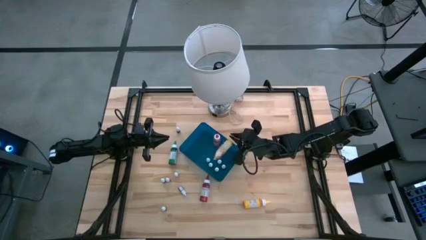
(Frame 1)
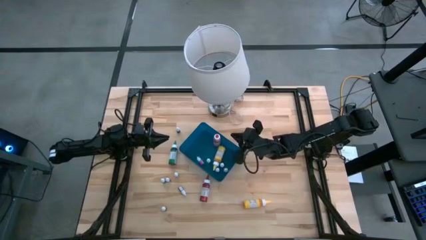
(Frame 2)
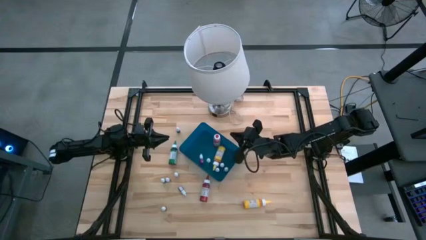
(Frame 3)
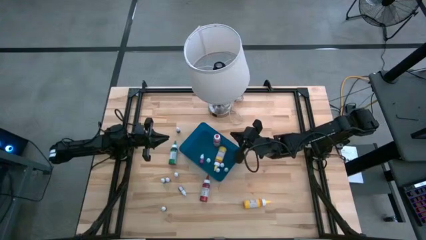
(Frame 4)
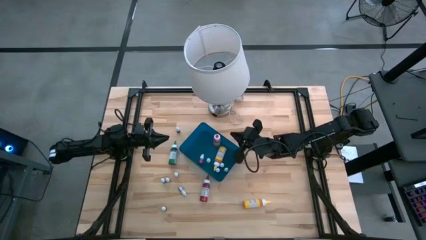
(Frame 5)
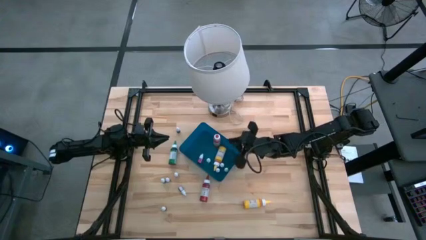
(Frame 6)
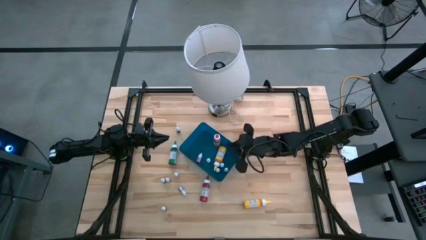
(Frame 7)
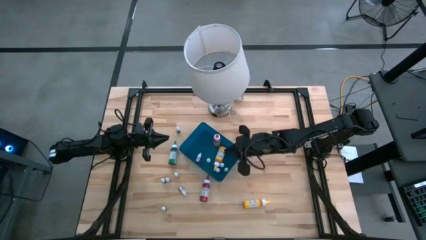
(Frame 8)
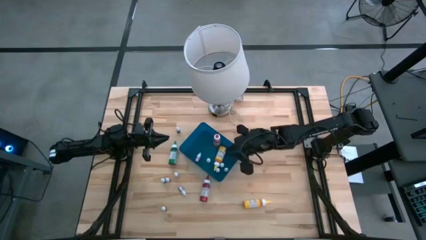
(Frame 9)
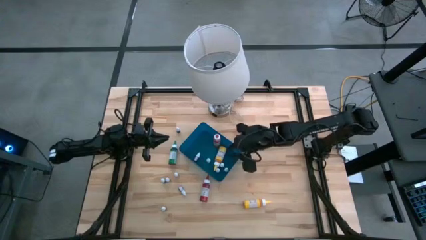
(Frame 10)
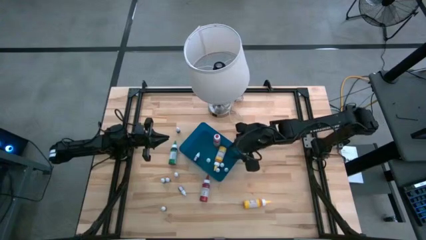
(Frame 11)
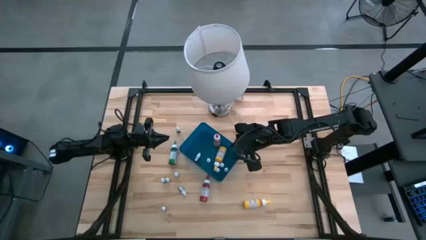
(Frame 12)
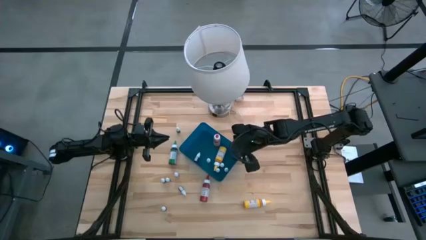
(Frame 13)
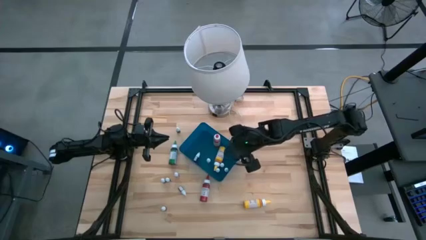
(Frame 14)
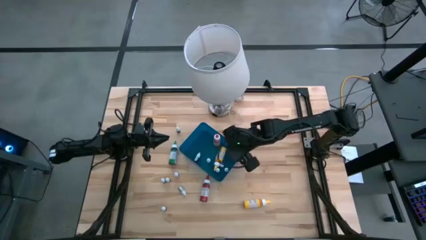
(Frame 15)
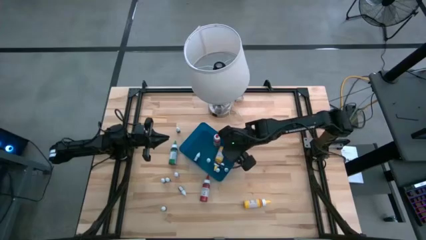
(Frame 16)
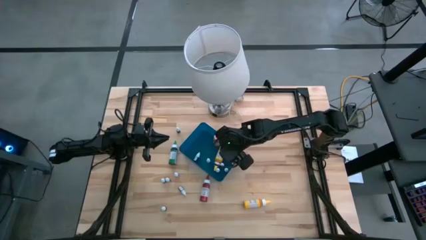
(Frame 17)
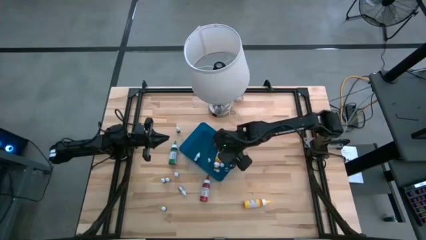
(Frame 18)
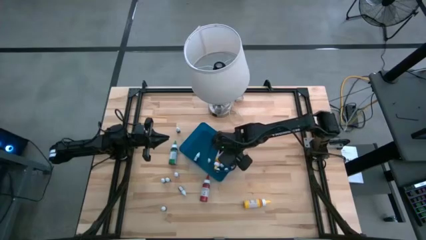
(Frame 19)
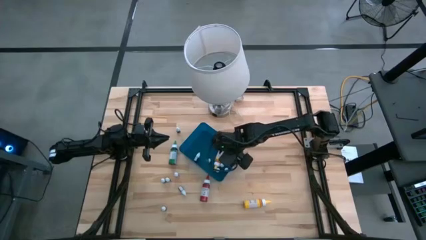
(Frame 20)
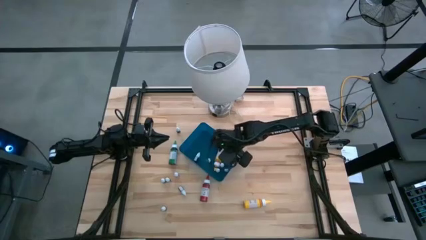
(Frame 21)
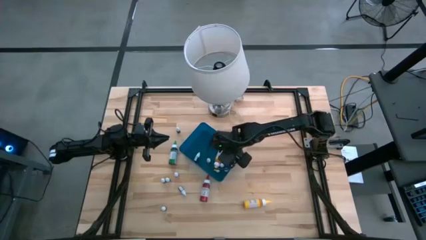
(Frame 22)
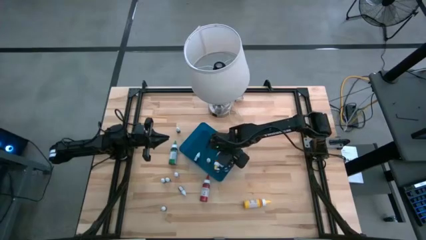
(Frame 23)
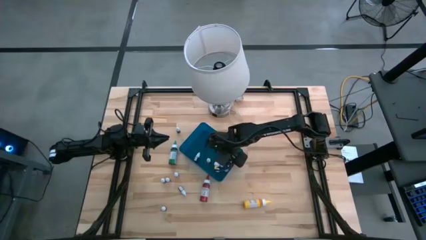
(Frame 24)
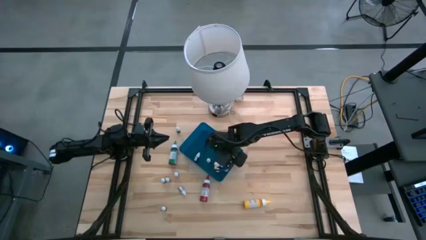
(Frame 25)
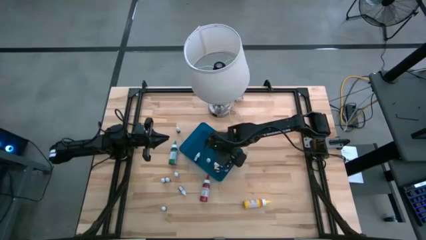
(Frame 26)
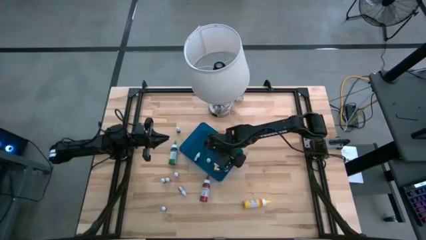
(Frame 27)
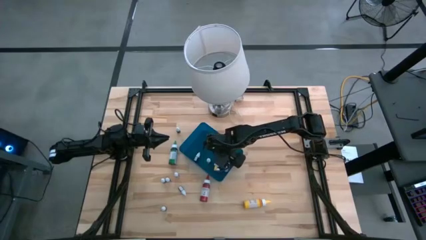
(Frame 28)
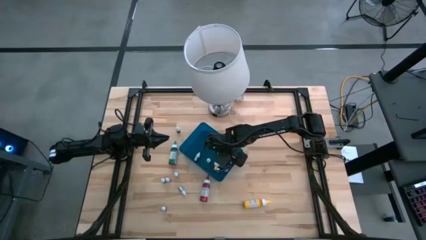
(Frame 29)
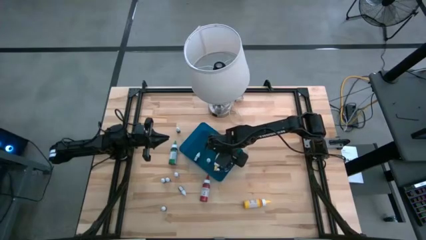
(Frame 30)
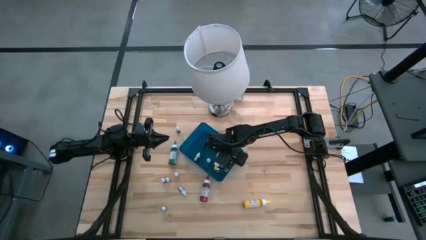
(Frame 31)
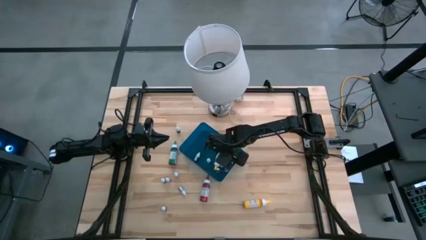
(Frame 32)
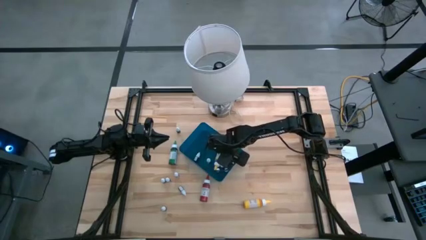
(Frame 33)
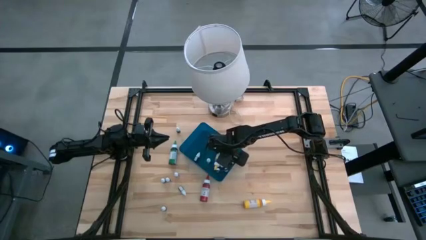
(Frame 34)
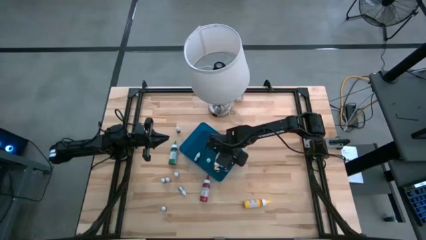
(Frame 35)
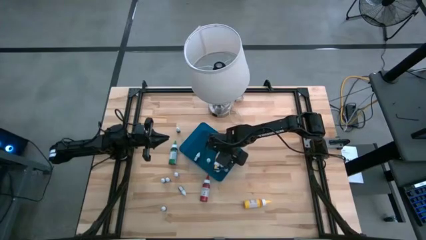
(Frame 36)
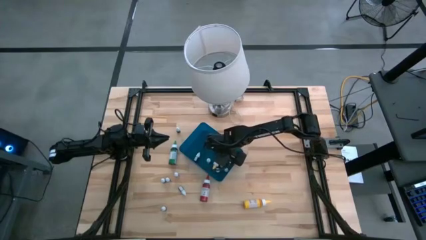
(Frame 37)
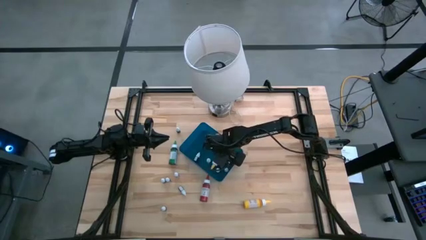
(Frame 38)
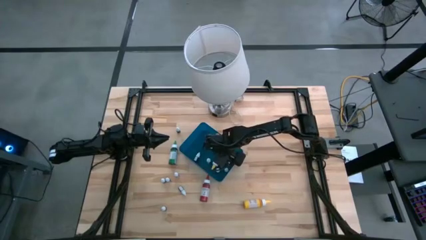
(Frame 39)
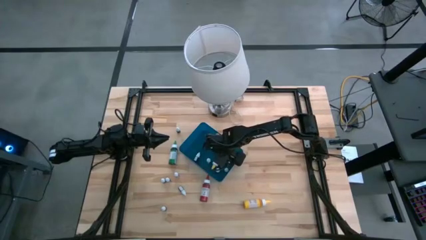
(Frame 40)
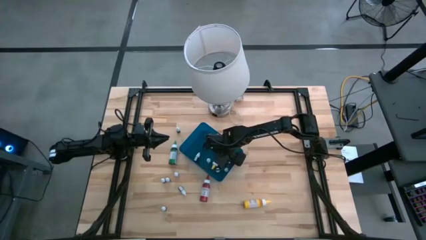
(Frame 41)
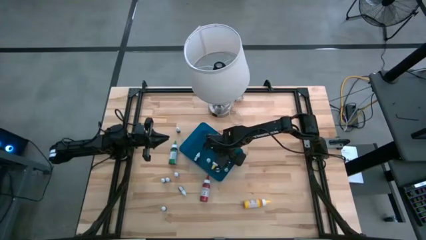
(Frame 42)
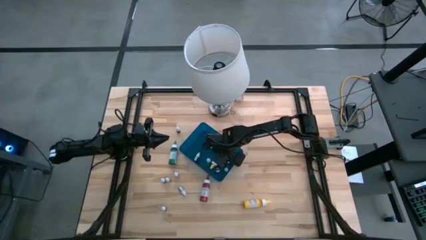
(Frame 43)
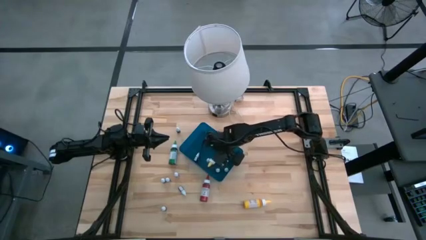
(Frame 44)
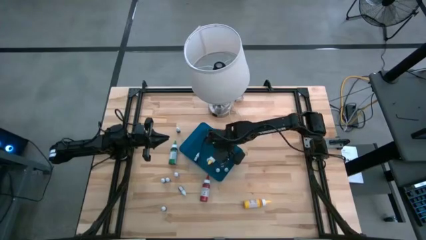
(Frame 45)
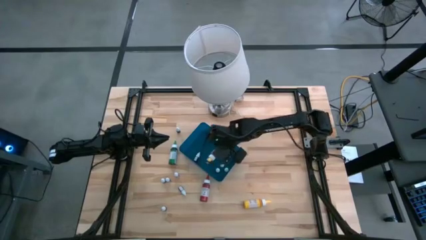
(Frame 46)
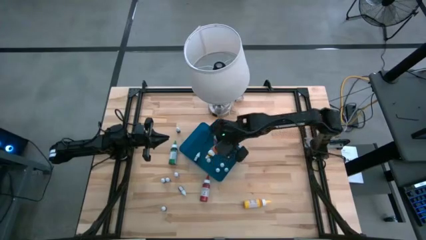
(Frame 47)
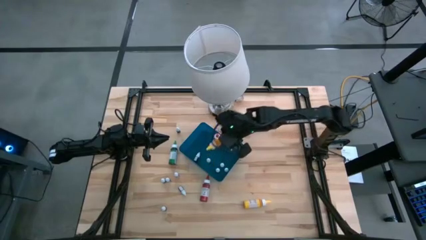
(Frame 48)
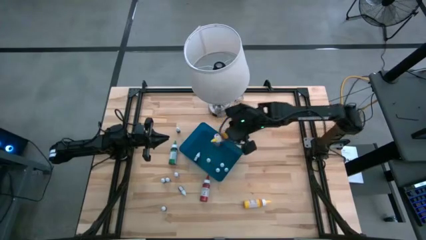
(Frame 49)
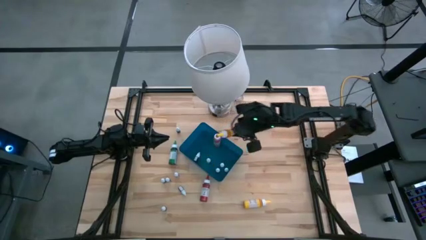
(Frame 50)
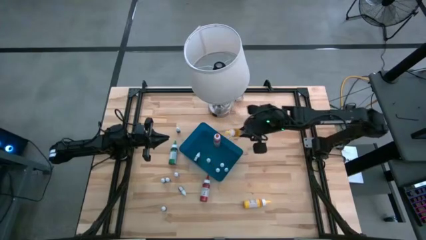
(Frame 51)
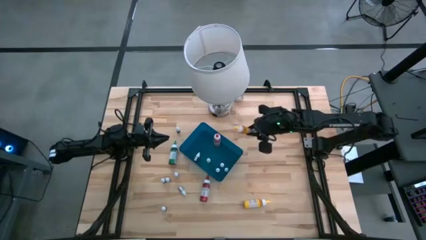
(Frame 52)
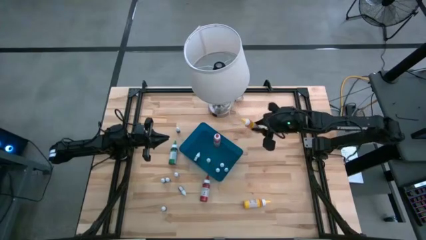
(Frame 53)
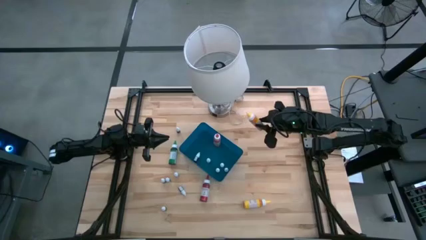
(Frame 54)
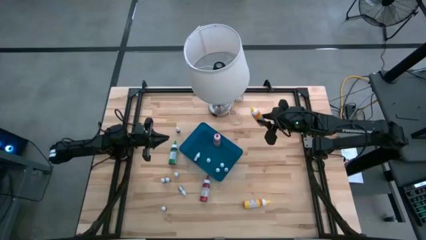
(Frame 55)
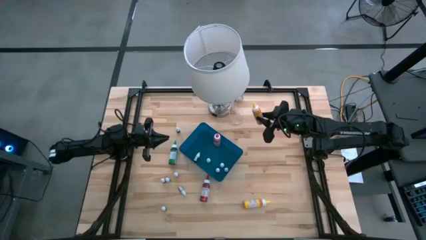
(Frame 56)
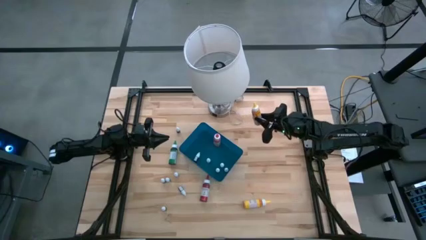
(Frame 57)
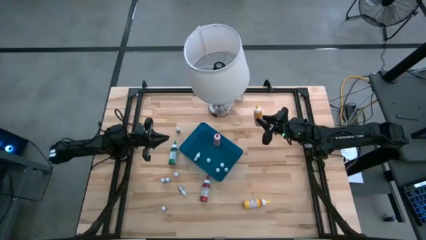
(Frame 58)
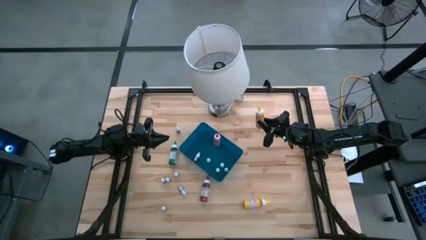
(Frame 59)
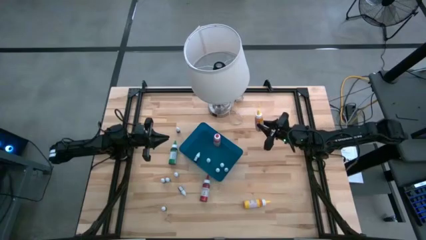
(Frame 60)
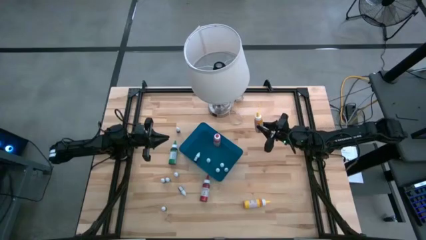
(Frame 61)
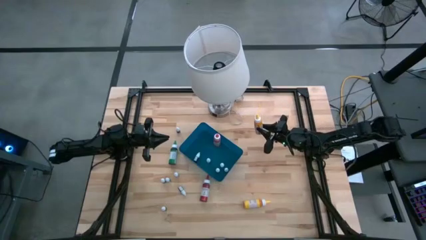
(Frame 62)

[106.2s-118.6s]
Task: Pick & Place food coloring
Remove the large yellow food coloring bottle from the blue container
